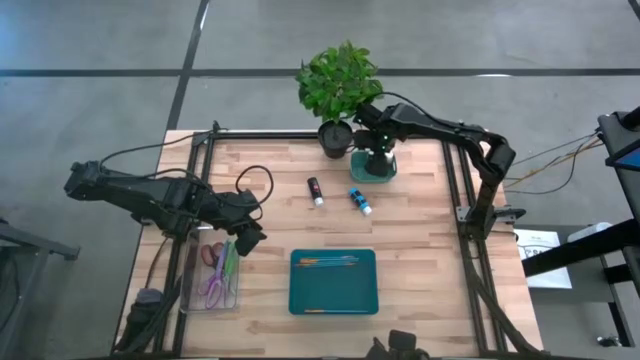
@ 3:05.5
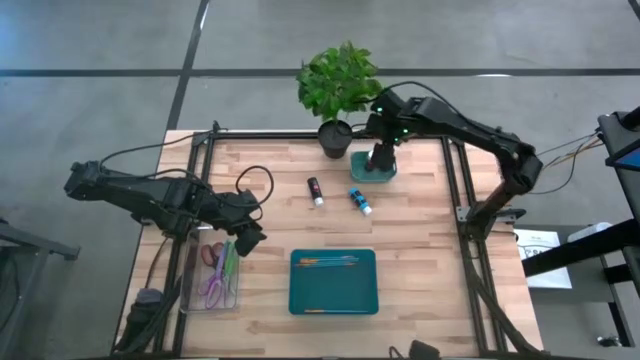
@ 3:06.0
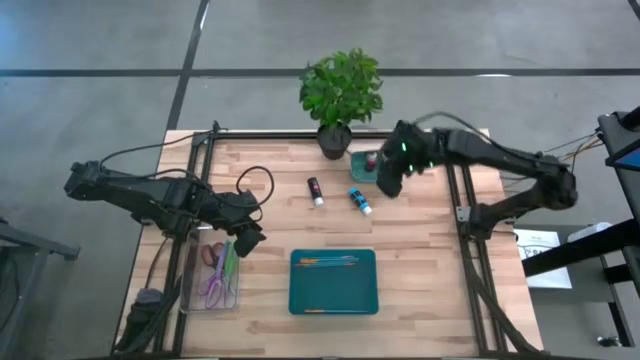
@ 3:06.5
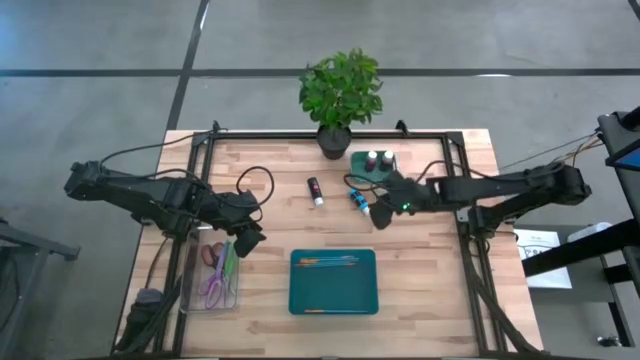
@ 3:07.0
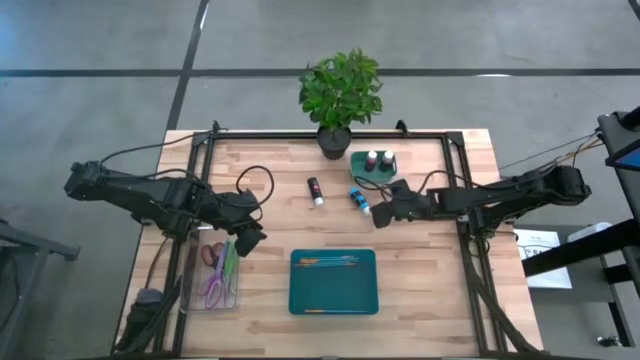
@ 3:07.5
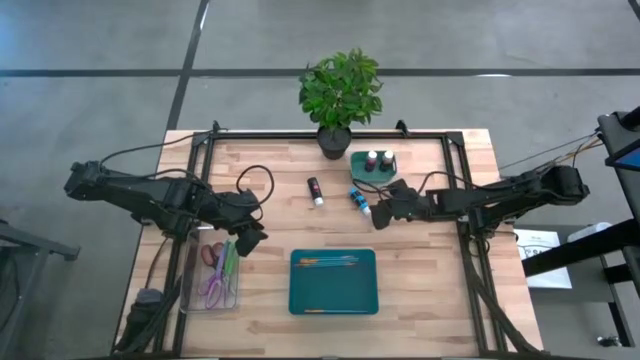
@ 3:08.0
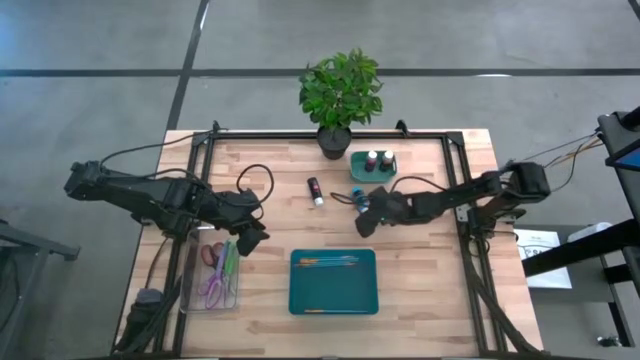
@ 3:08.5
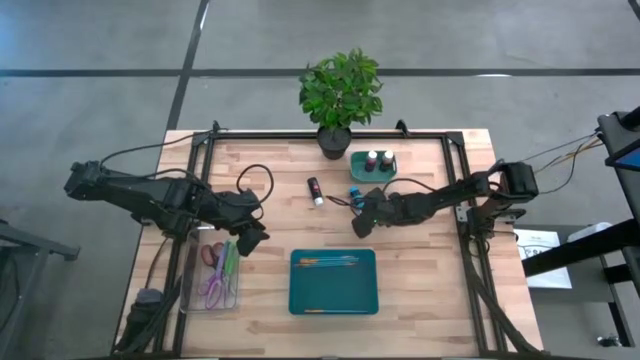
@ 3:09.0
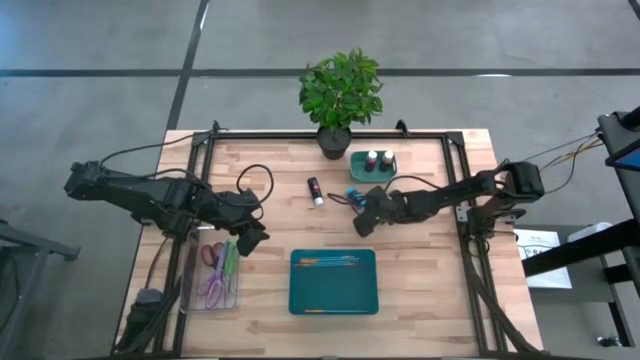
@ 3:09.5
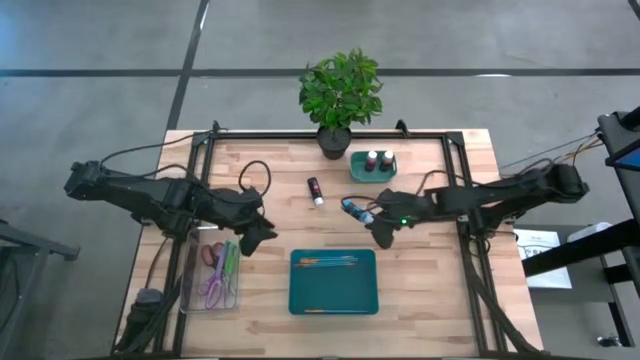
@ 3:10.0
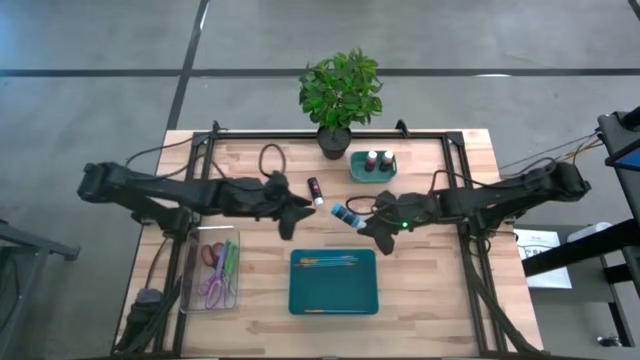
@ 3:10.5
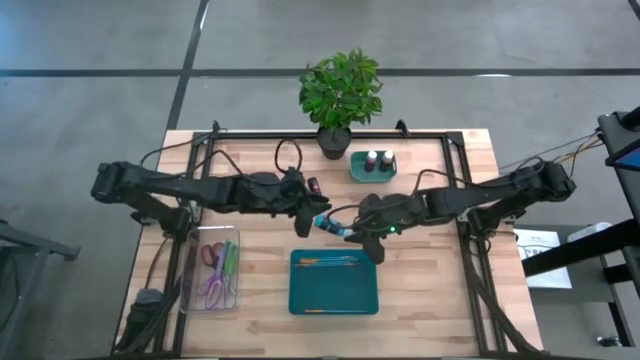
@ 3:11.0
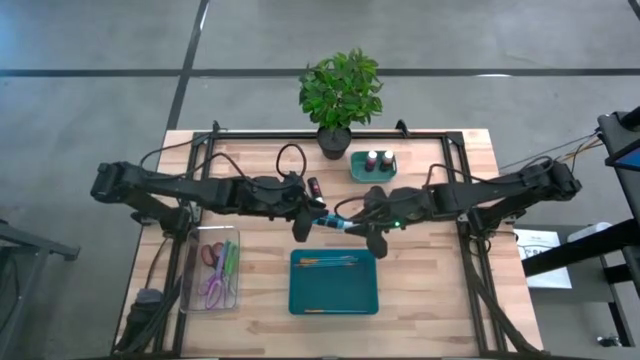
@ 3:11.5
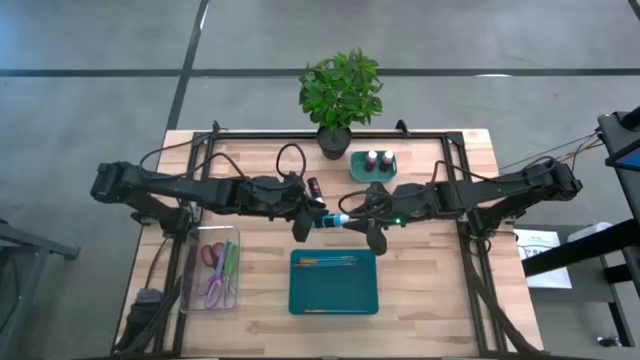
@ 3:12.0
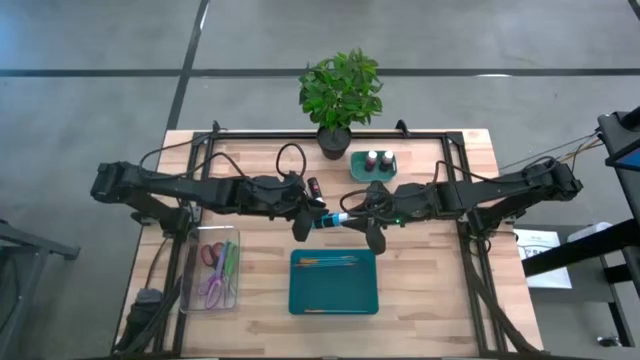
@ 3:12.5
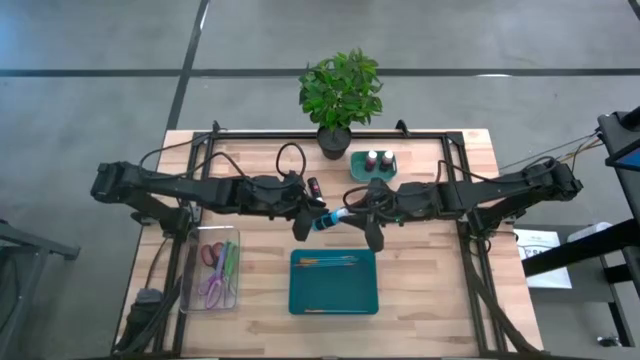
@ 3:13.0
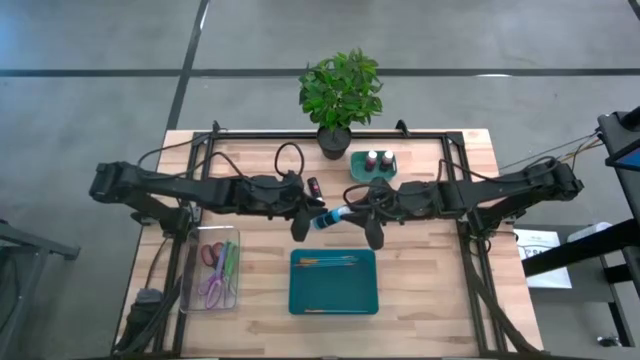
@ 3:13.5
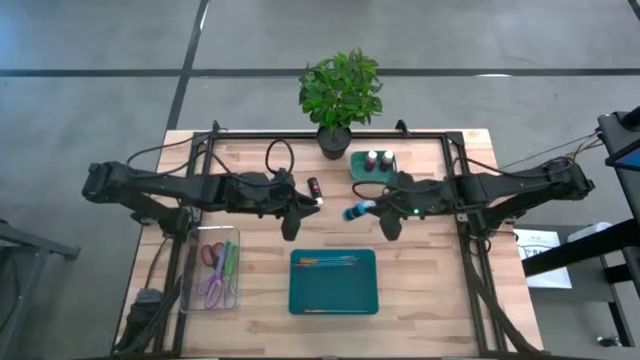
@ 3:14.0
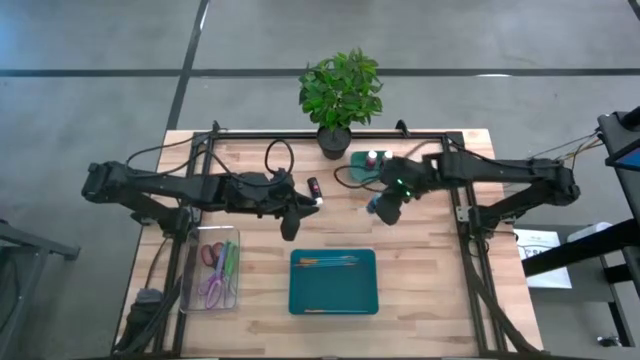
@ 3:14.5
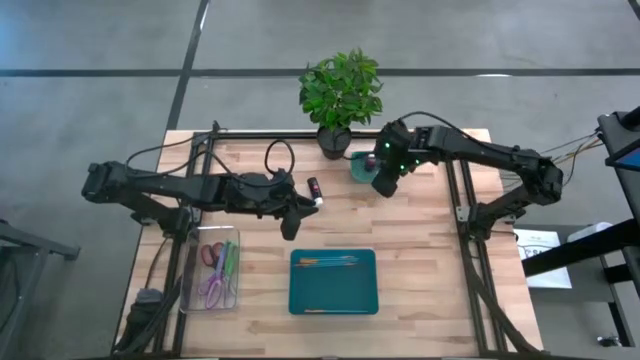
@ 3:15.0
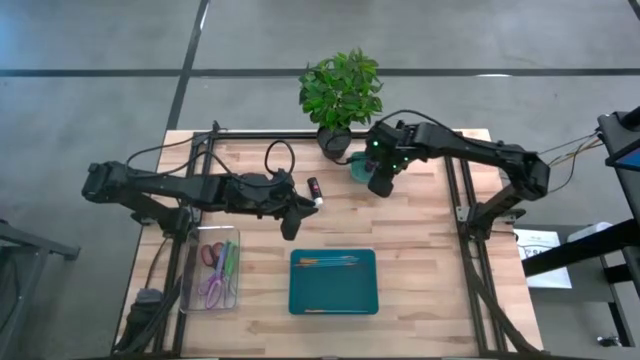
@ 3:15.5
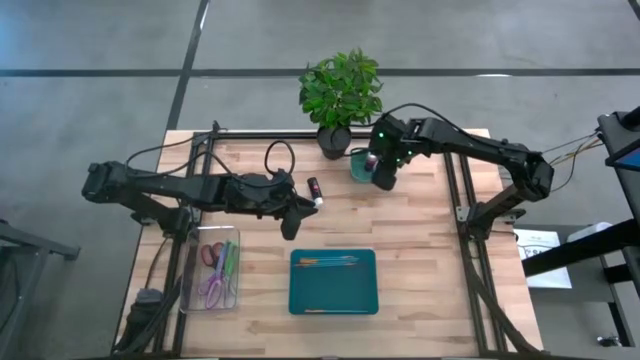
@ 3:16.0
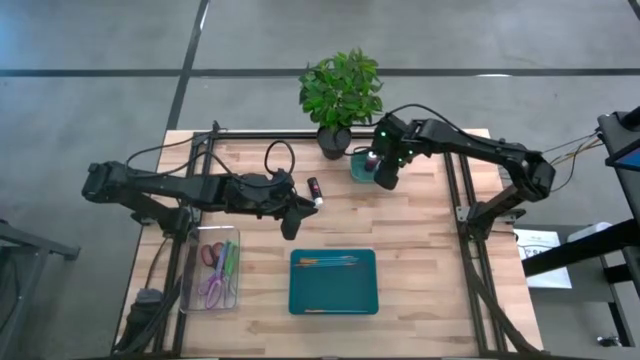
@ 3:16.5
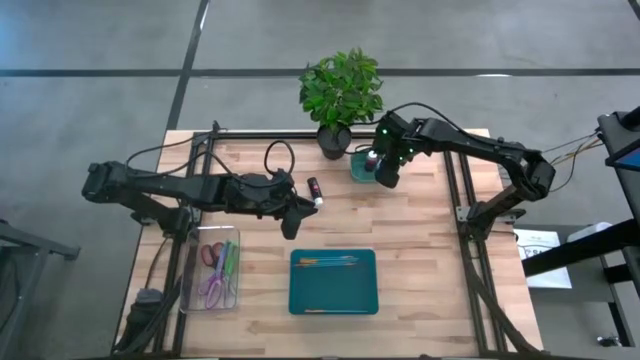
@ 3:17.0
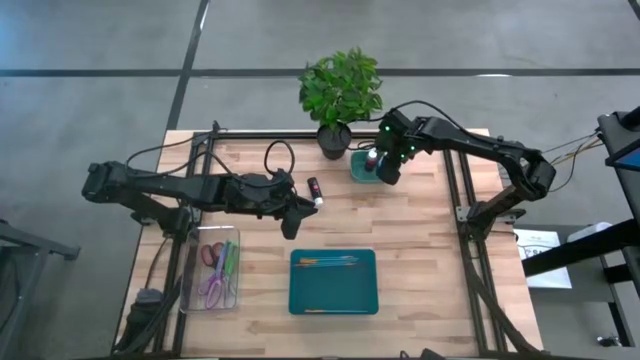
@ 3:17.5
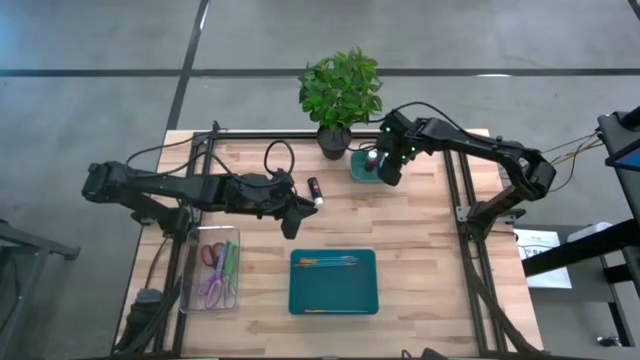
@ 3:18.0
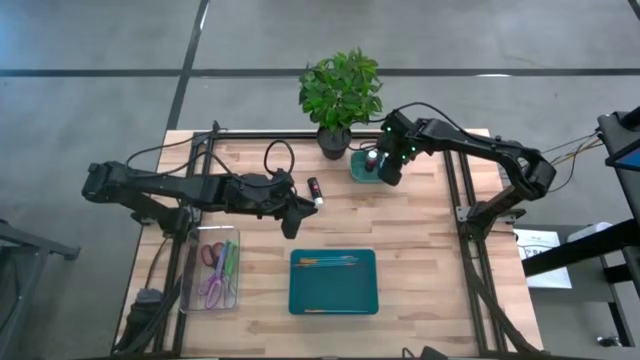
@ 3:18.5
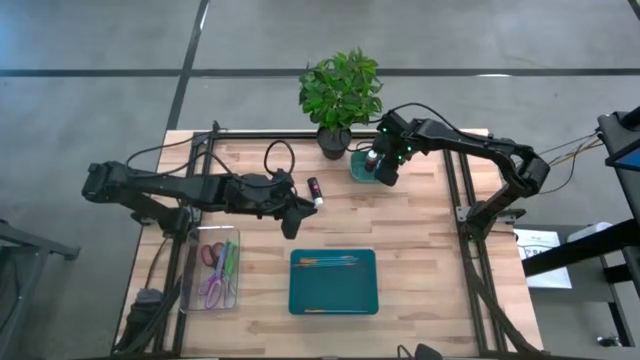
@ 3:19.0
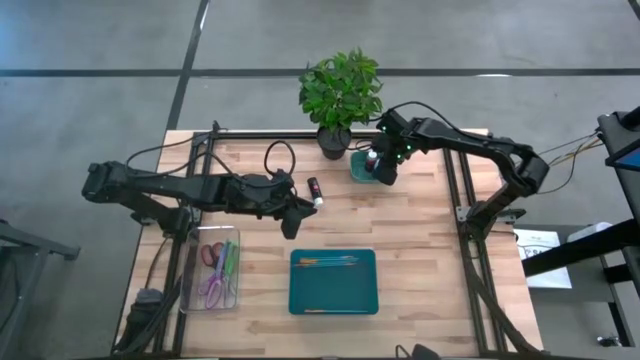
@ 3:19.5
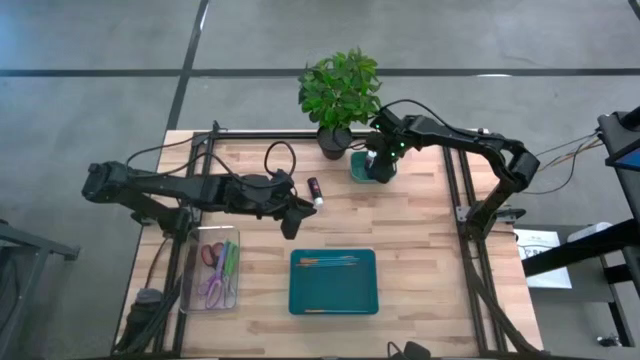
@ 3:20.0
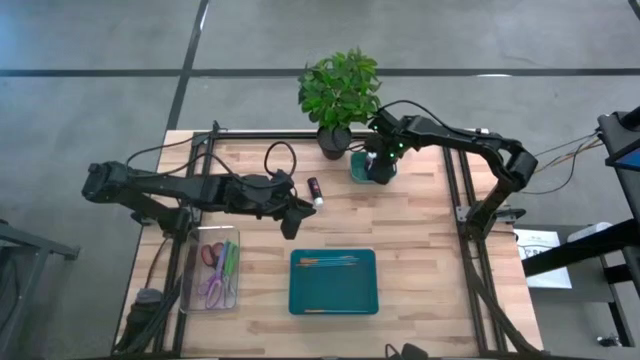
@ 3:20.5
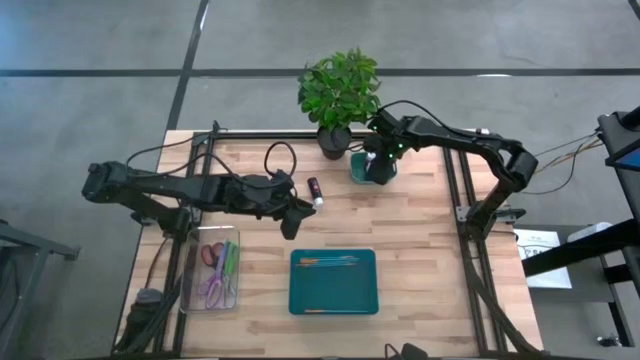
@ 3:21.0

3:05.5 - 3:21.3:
Task: Pick & Place Paint Supplies
Put the blue paint bottle into the green bin

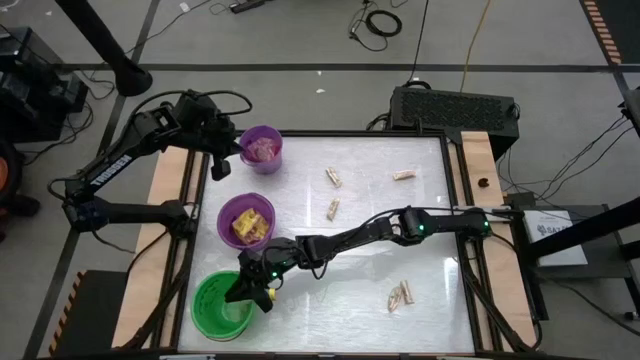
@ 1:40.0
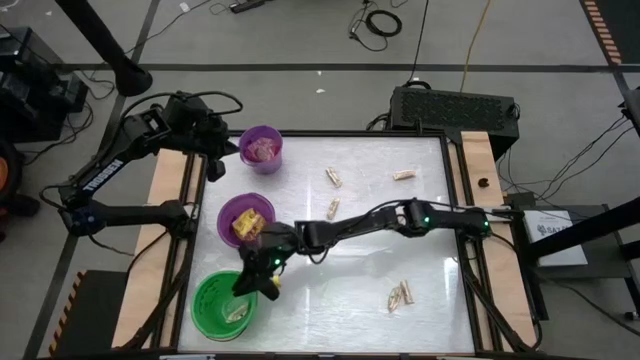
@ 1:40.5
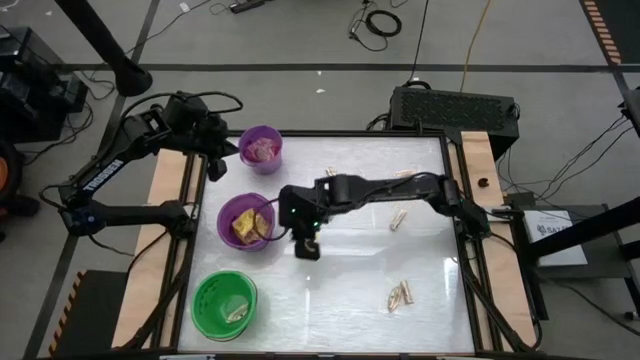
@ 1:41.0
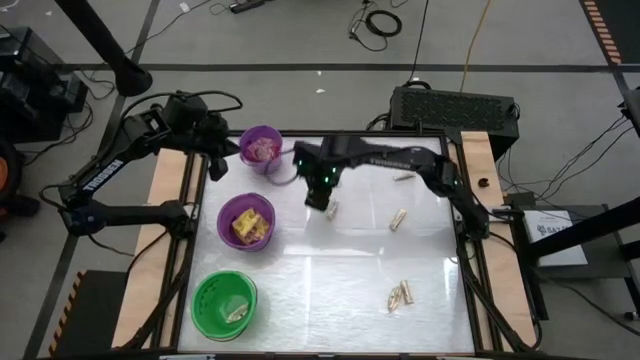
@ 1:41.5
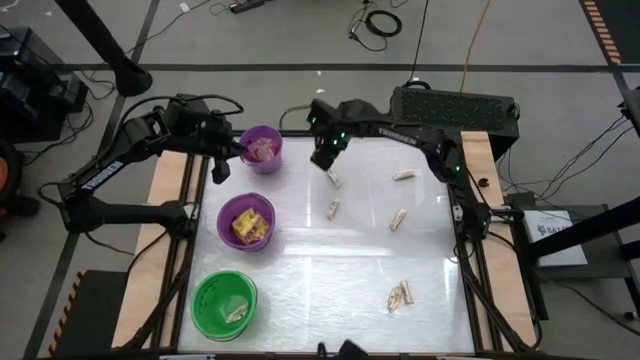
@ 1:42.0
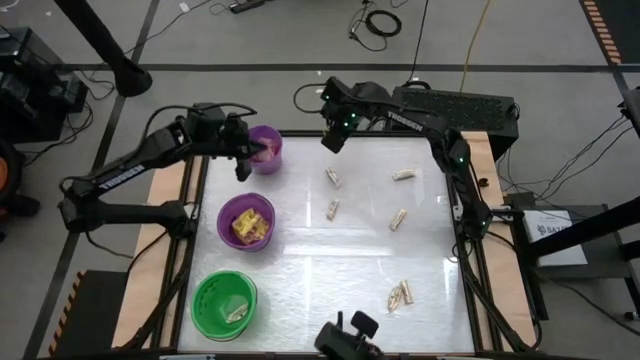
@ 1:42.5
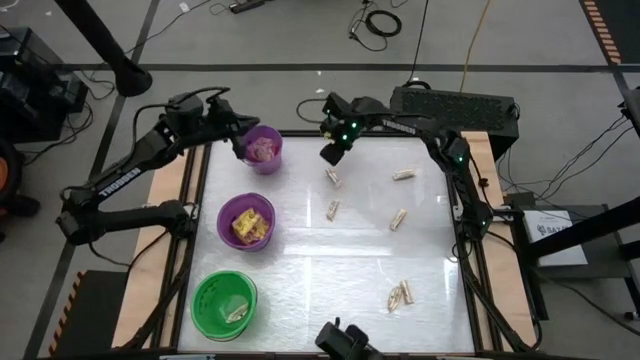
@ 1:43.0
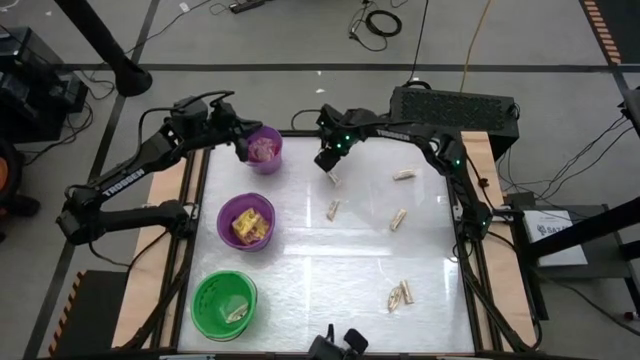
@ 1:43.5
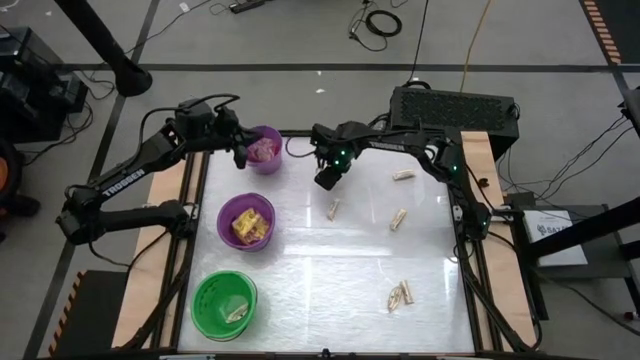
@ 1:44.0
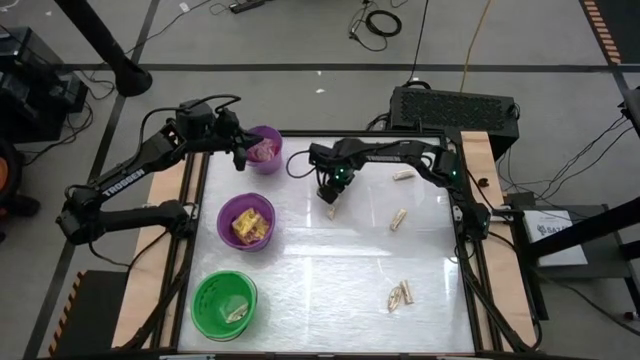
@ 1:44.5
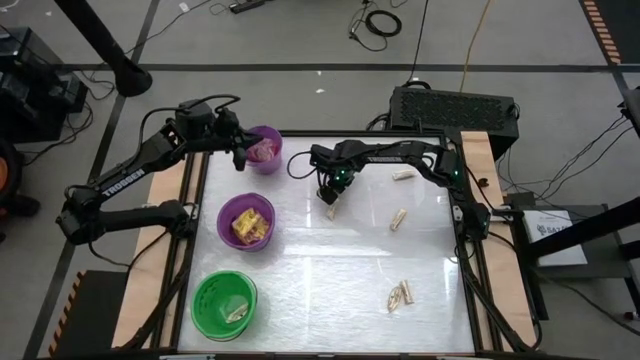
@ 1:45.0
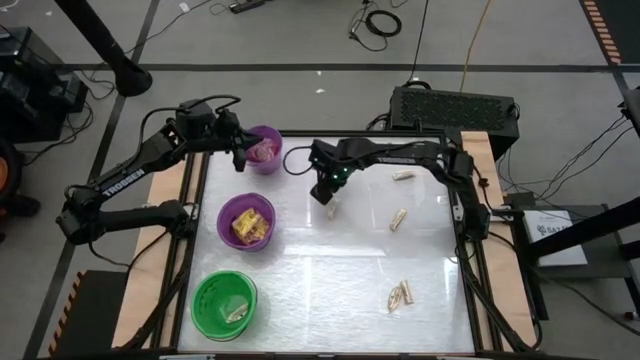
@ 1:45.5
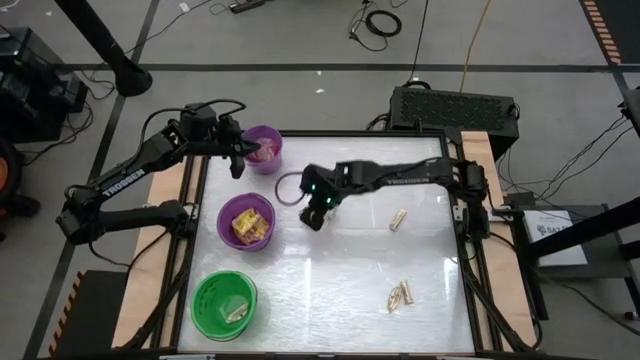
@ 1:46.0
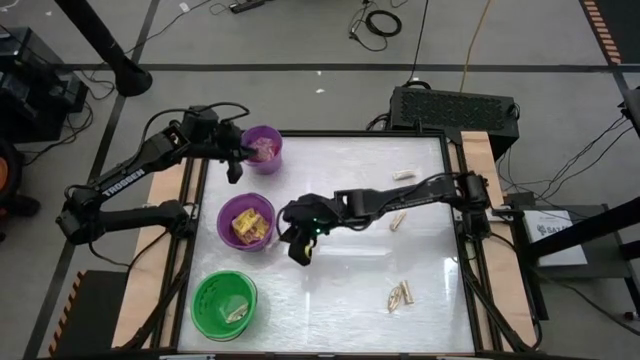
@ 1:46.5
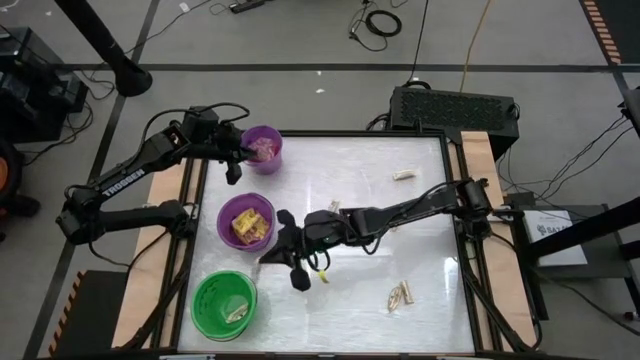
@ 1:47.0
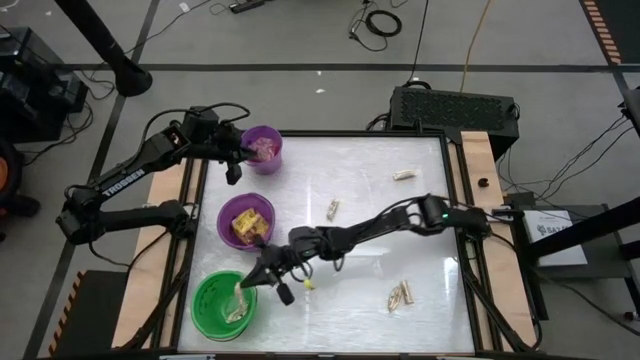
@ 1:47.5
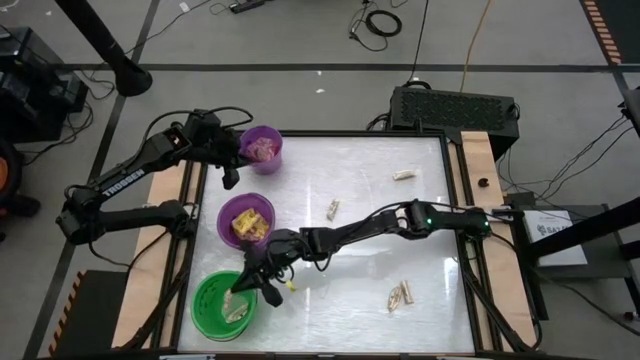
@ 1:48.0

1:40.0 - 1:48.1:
Task: Sort candy by brand, put in halloween buckets
Put the white candy into the green bucket
